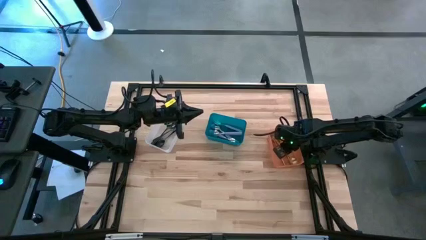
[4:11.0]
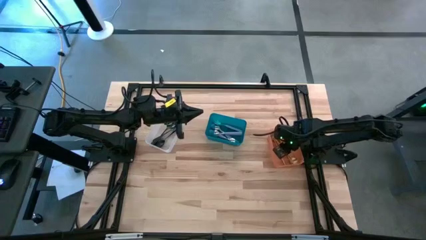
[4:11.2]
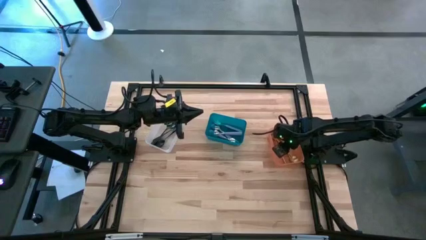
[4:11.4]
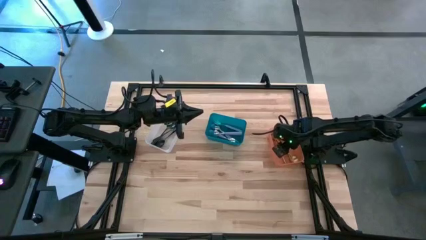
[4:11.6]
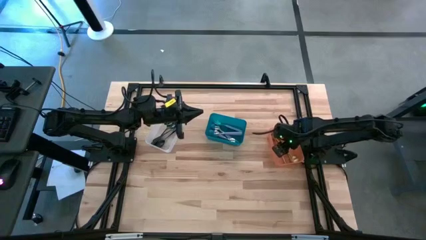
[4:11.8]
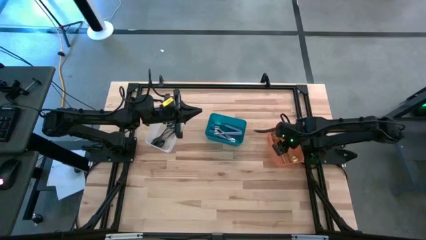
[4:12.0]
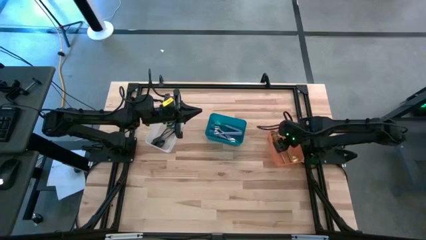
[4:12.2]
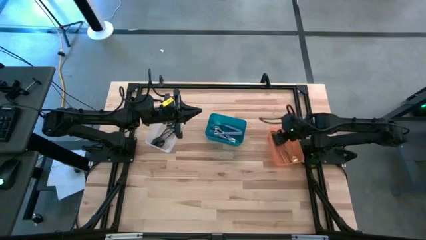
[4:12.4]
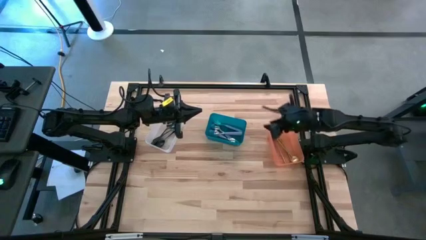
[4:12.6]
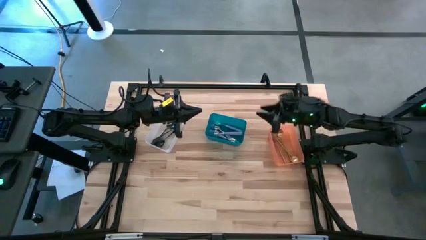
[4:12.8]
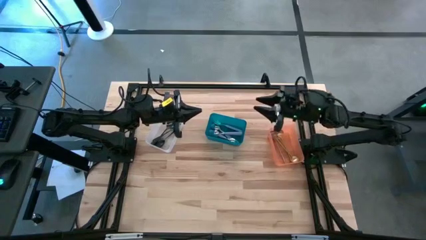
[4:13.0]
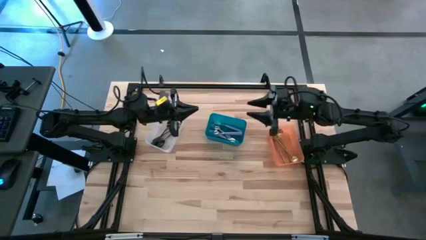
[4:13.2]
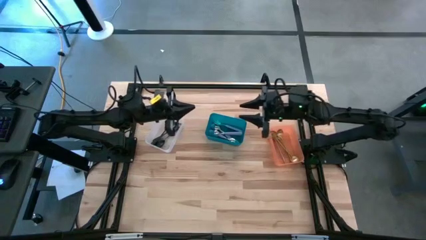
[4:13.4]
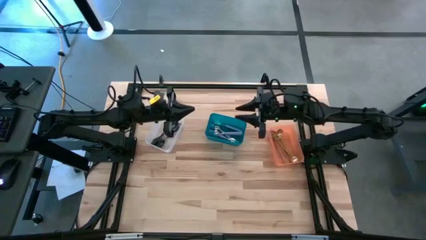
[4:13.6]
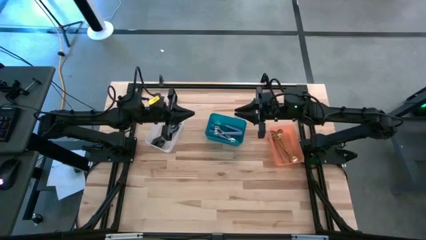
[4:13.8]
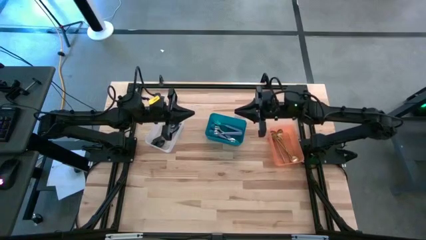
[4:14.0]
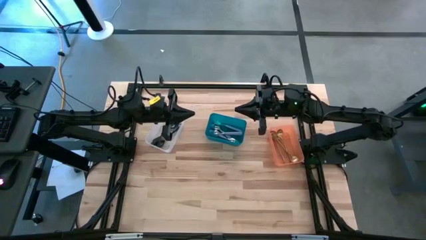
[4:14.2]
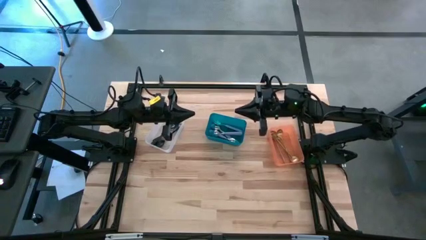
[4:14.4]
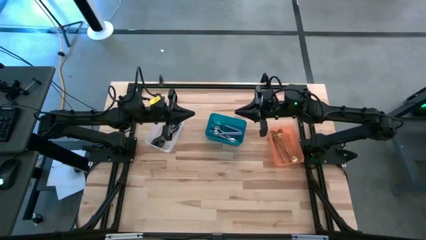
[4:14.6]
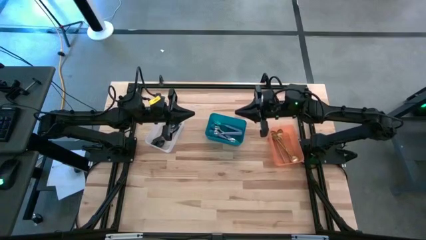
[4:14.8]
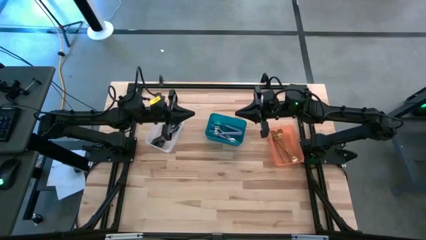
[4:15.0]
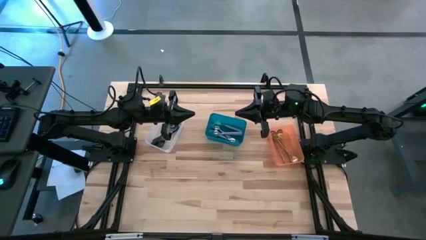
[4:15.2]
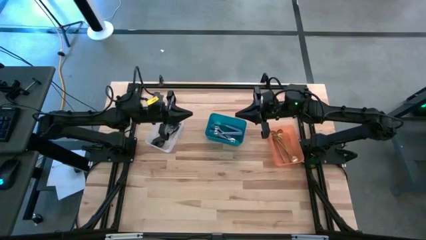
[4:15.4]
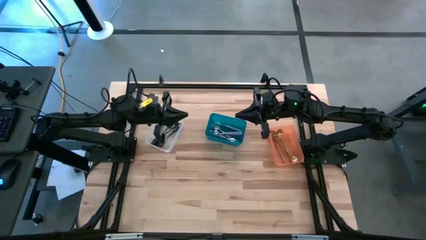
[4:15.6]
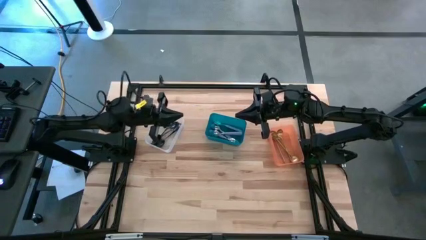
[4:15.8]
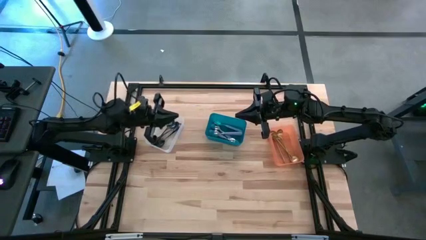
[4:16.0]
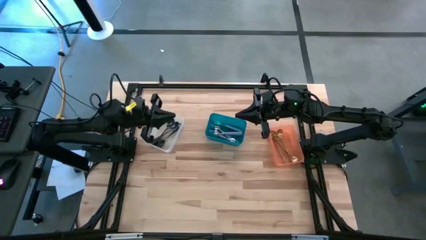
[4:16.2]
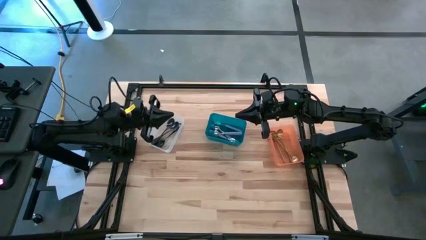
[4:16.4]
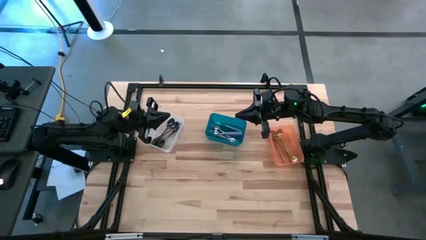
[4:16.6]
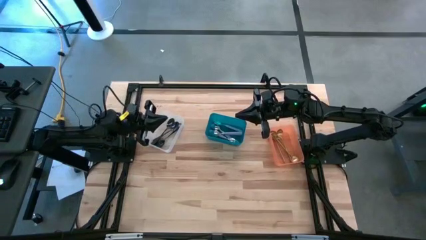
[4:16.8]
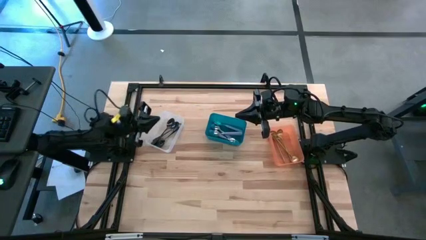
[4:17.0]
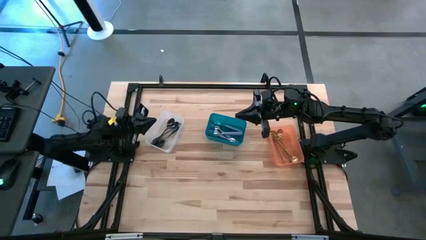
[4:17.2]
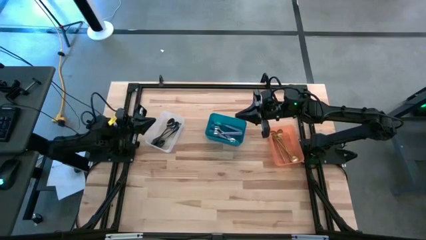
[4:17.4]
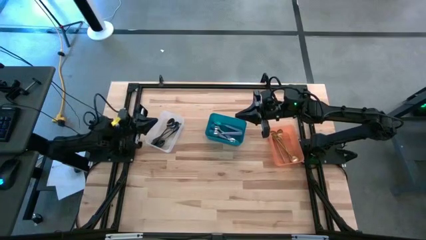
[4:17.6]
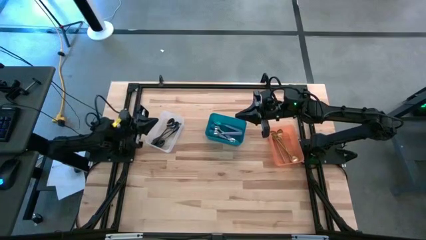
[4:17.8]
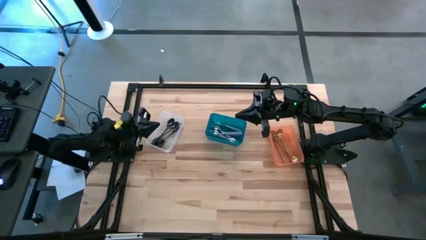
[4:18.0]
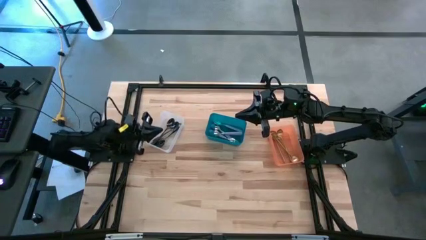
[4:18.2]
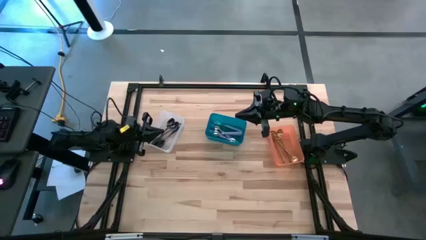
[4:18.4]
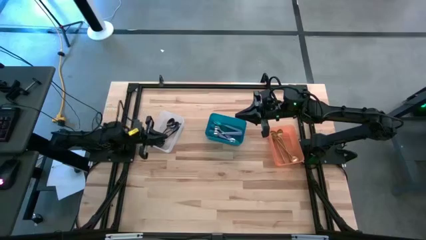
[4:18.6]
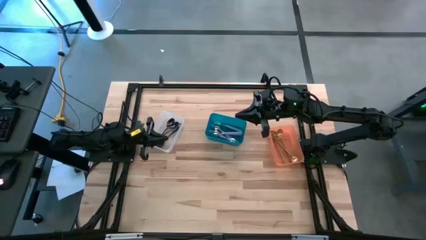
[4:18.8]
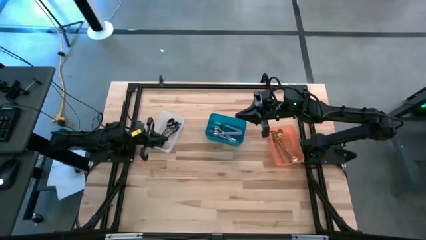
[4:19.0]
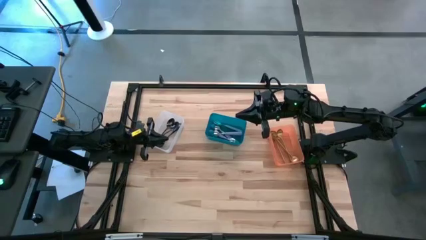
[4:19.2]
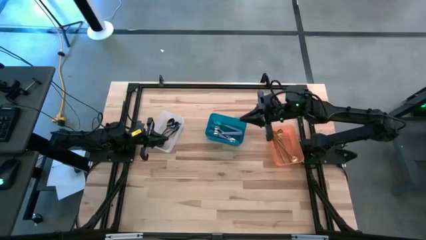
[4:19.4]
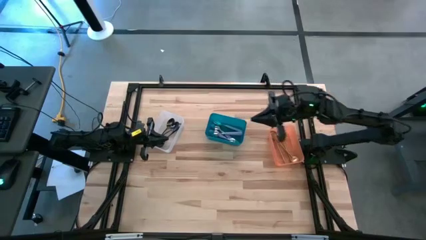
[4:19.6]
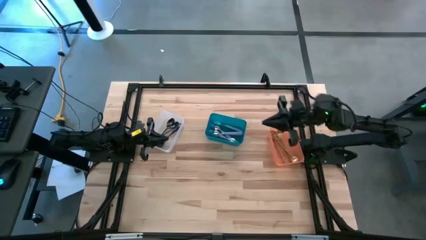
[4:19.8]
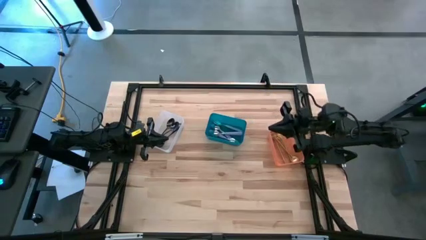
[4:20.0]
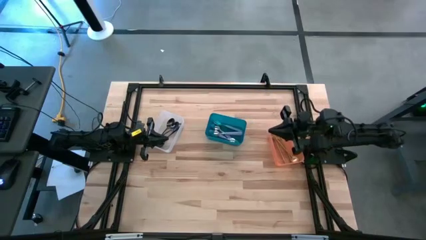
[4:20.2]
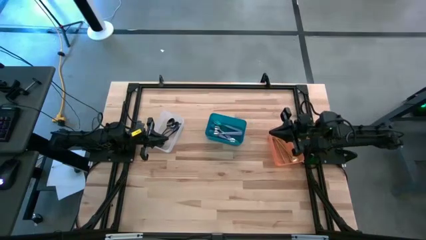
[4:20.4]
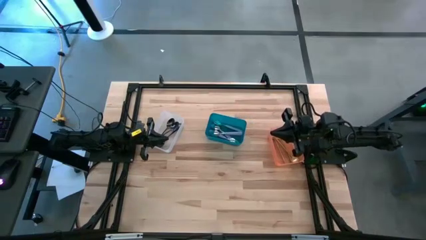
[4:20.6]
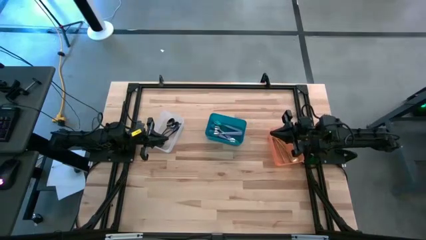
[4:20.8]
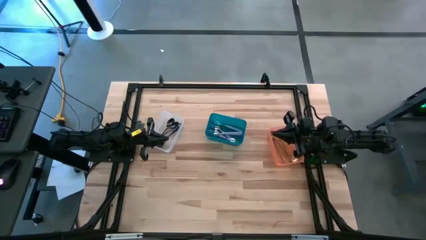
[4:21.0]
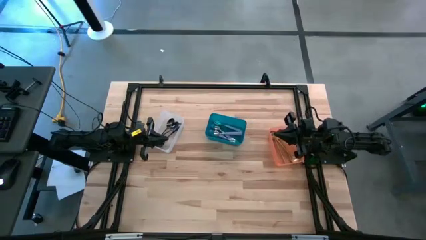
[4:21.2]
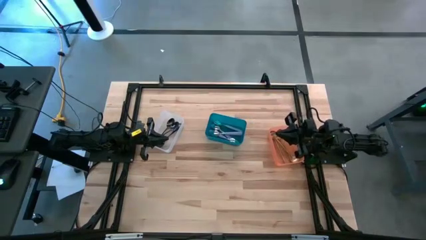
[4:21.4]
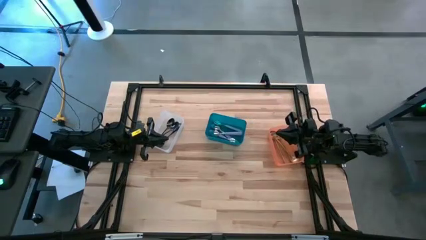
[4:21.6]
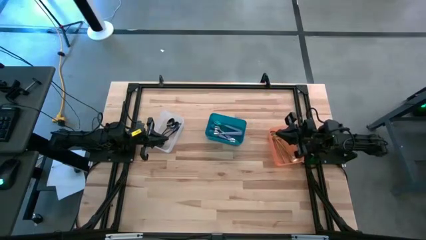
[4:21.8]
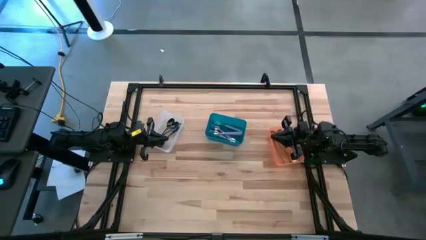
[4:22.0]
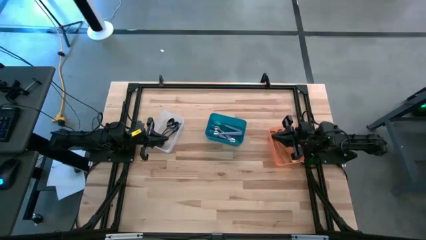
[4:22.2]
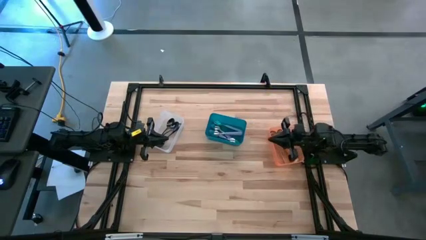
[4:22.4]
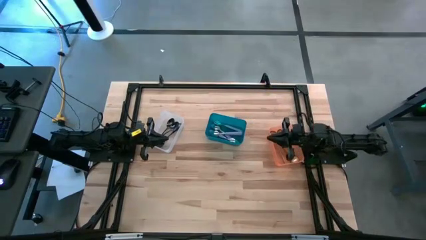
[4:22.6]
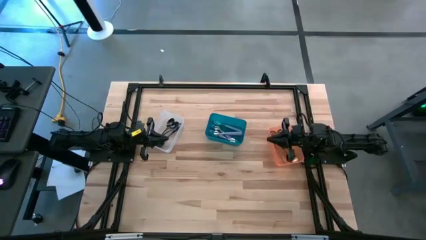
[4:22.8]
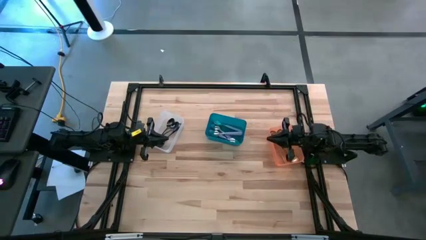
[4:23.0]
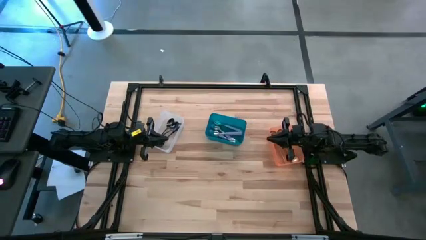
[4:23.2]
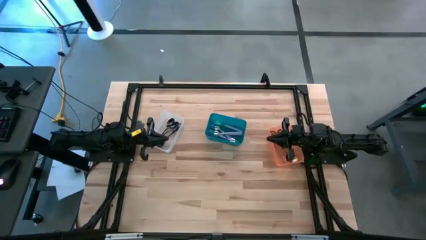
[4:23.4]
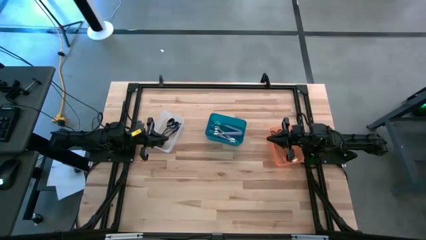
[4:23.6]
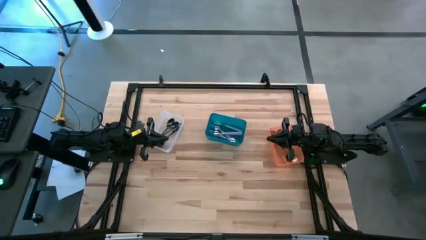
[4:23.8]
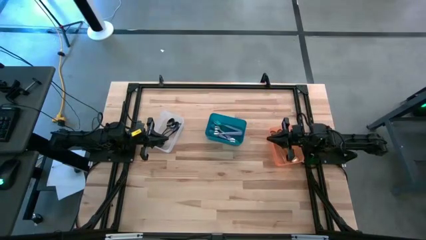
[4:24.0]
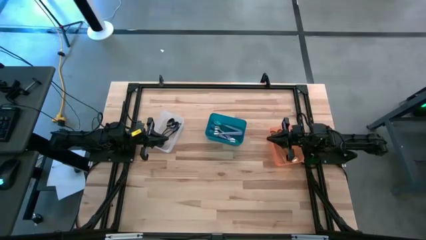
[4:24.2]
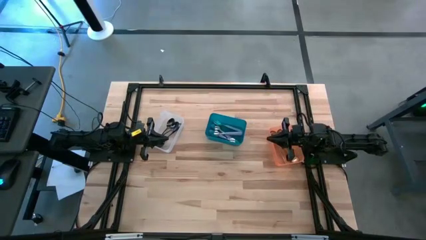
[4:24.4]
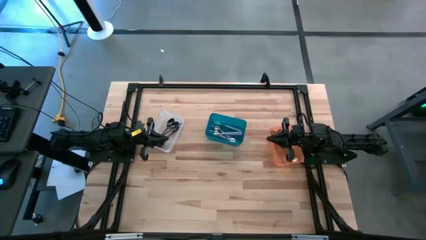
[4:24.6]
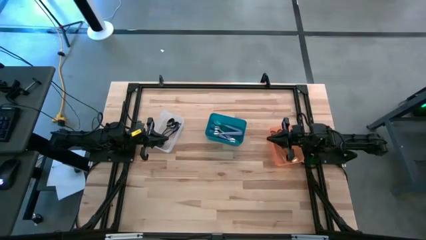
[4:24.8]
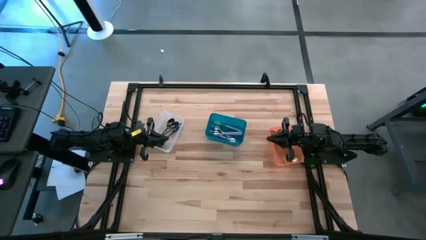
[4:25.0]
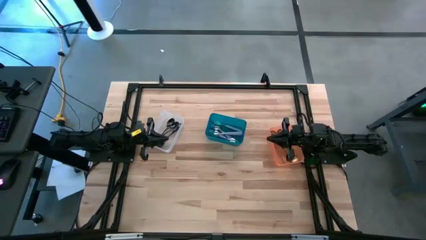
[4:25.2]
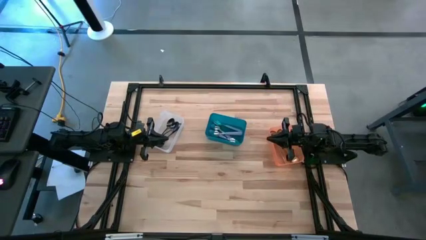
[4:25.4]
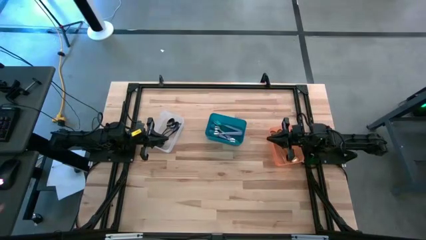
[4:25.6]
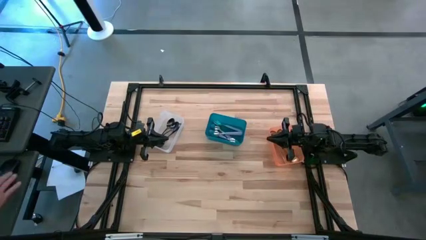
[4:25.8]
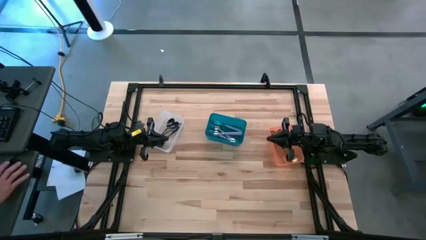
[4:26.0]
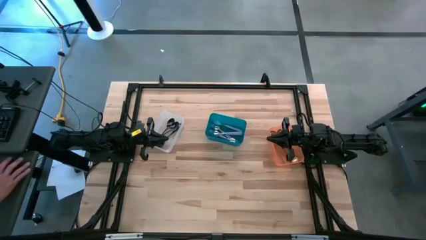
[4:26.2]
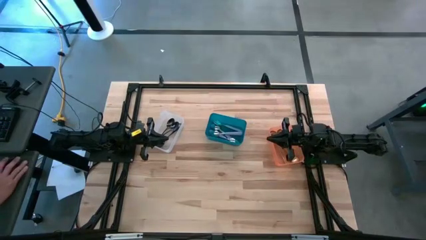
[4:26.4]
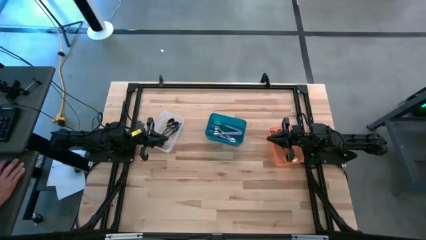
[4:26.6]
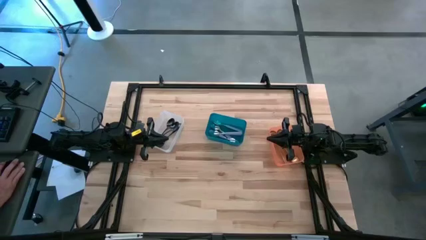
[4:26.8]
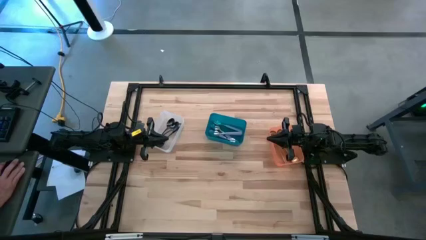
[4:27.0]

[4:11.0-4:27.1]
Task: Sort silverware by color (type)
Return to Home Position
